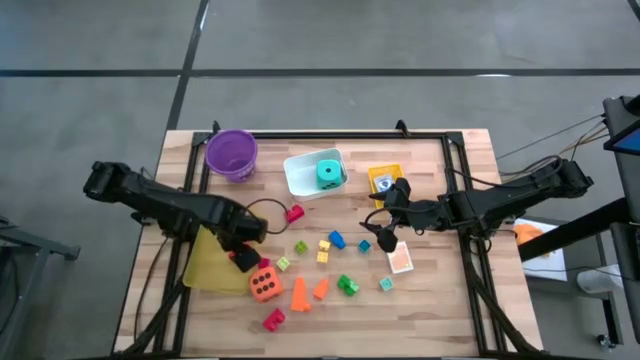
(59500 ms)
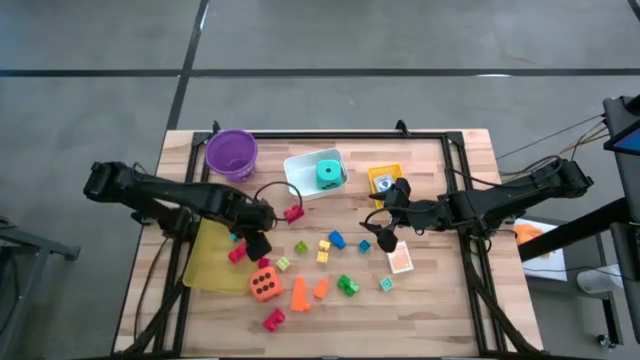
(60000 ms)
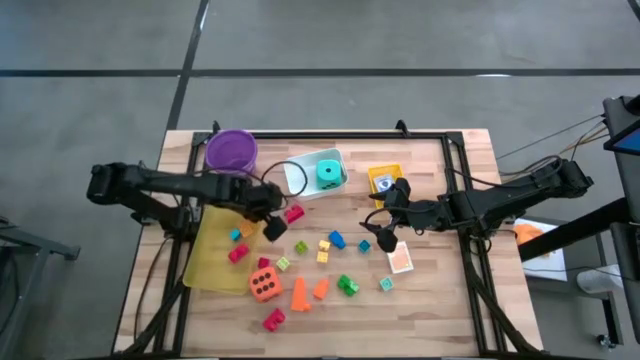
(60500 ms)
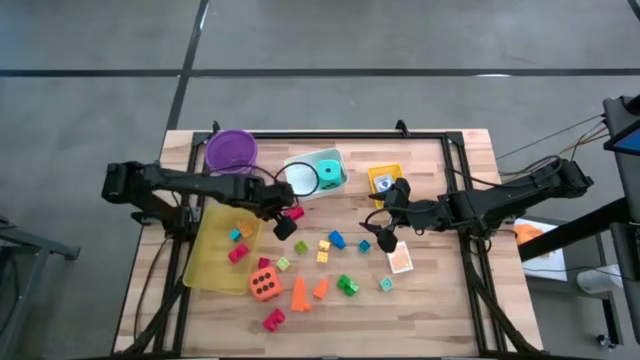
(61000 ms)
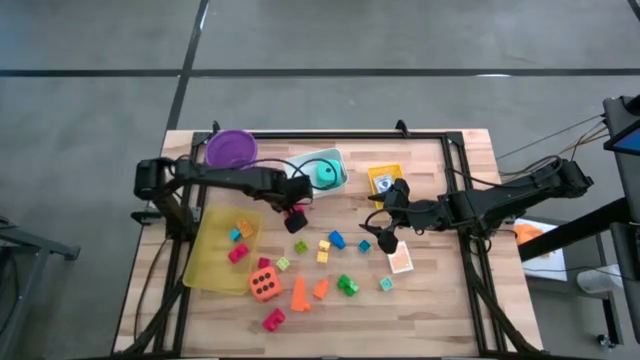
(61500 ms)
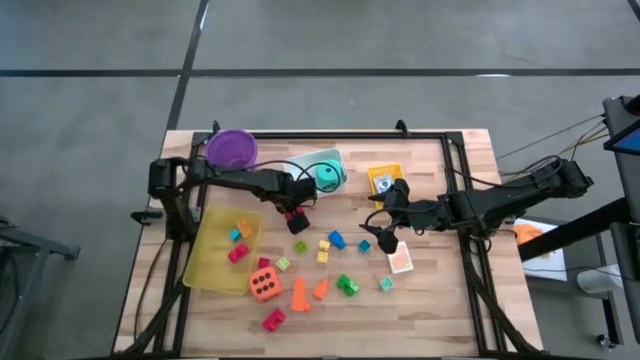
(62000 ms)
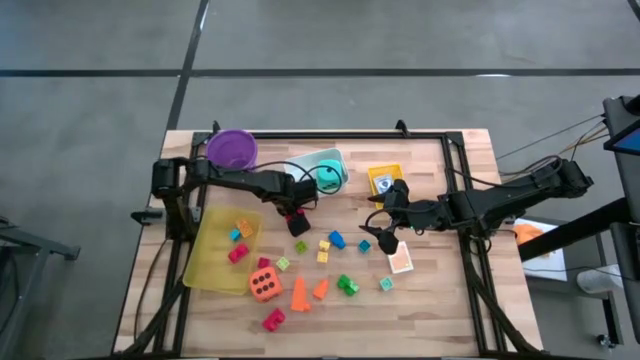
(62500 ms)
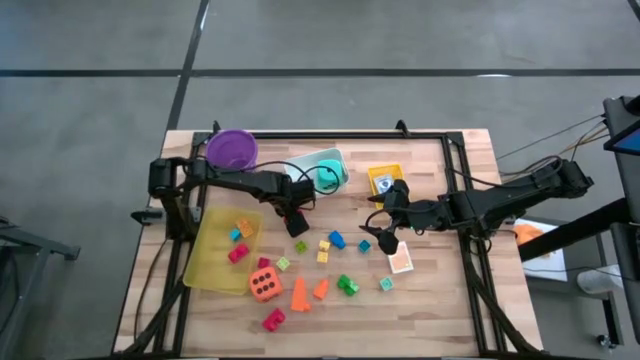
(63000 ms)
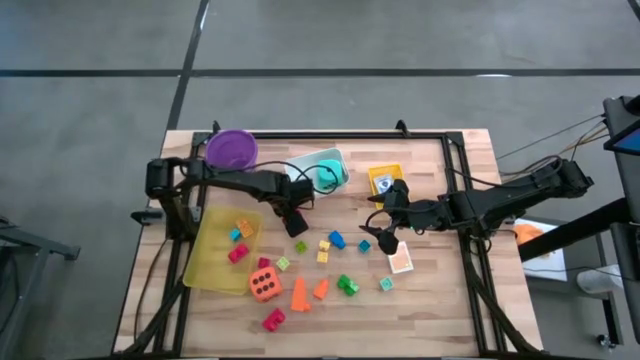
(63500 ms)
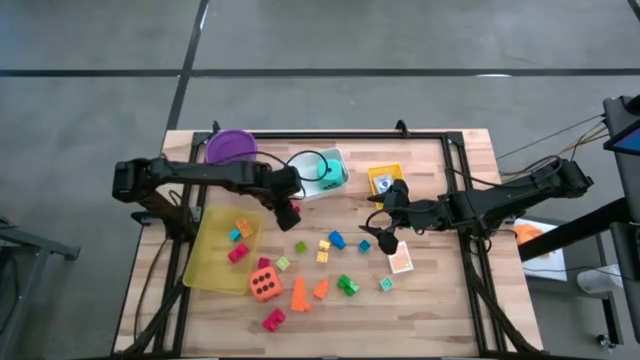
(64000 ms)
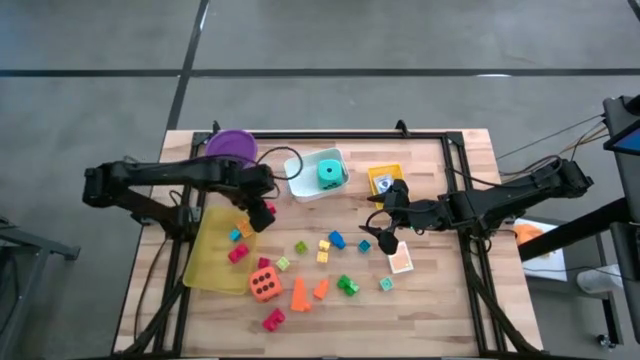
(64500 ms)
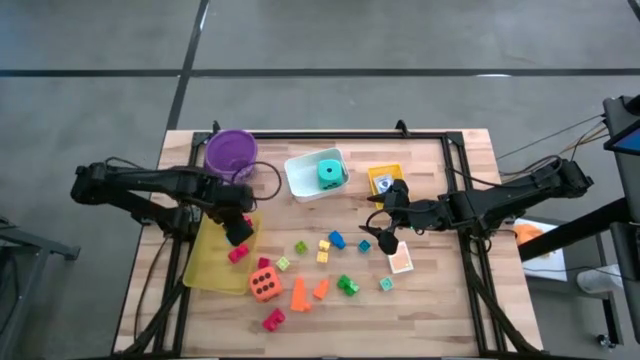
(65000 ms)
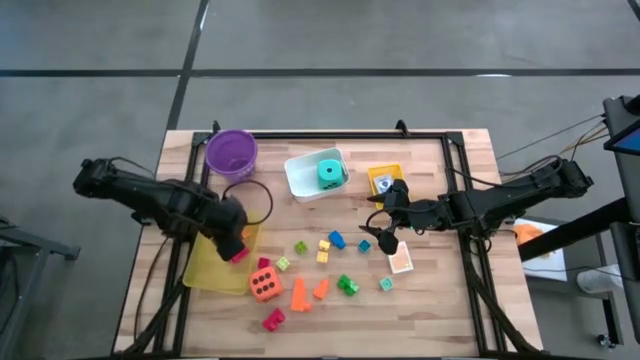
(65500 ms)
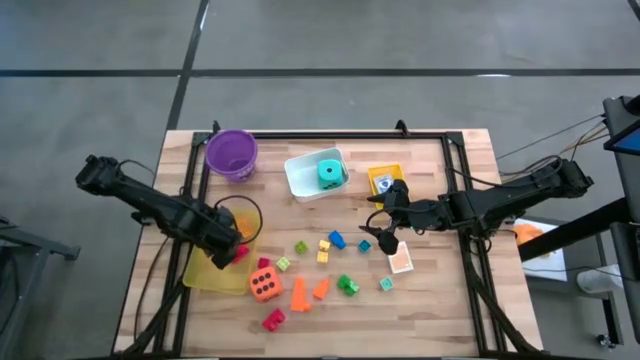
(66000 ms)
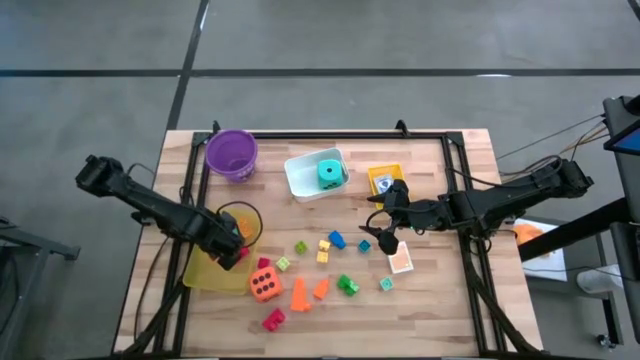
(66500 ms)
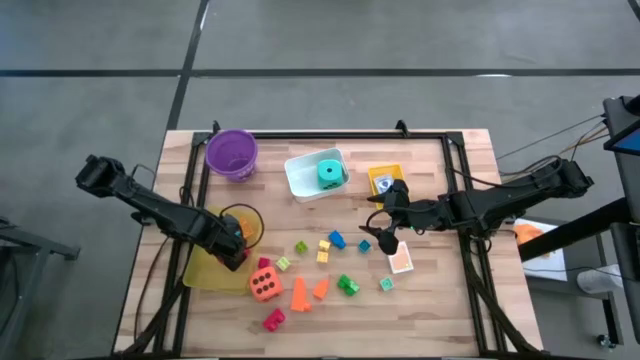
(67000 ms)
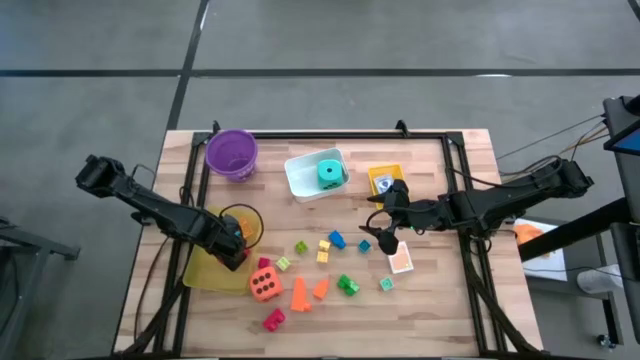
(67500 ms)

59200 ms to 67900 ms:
Task: Pick & Place Toys
Put the red game piece into the light yellow bin

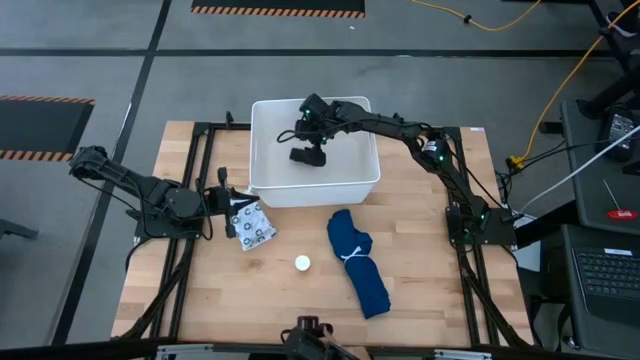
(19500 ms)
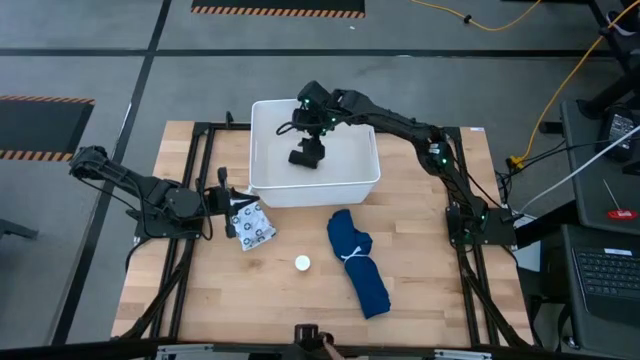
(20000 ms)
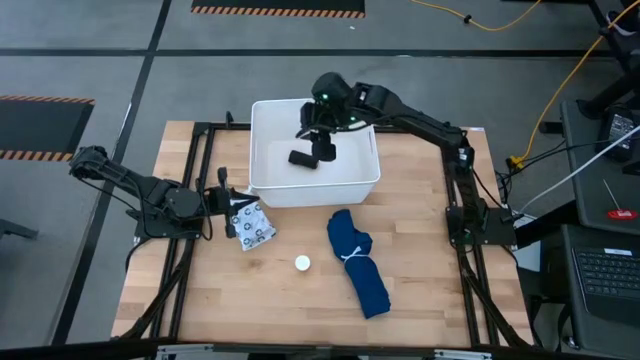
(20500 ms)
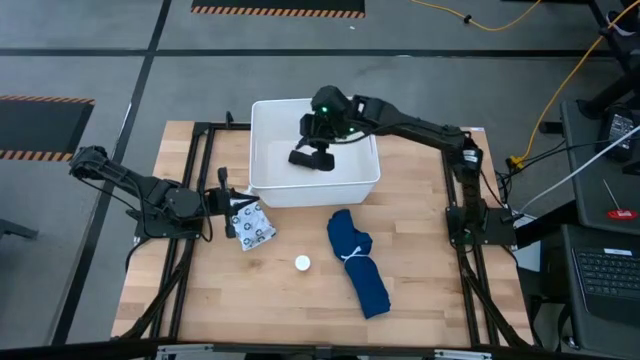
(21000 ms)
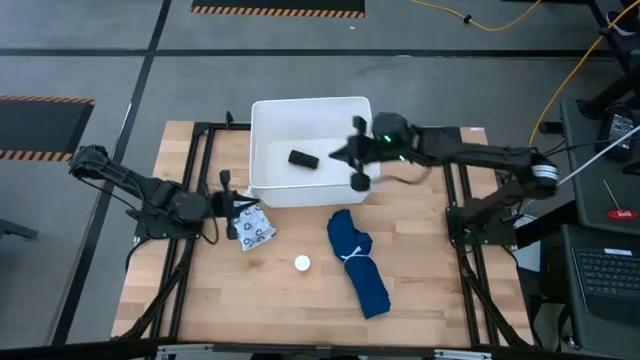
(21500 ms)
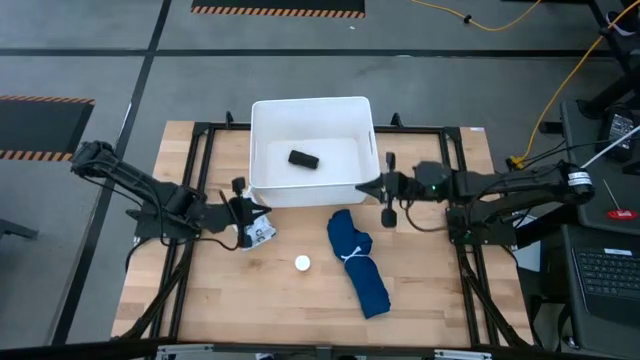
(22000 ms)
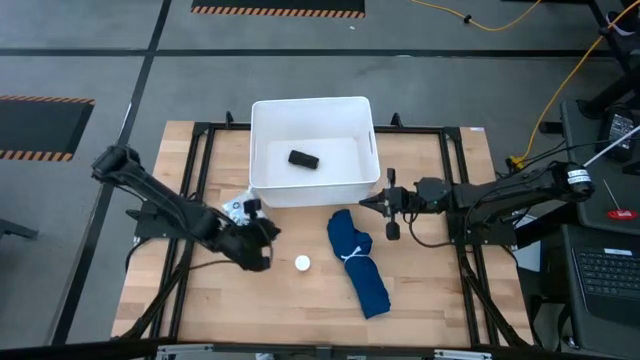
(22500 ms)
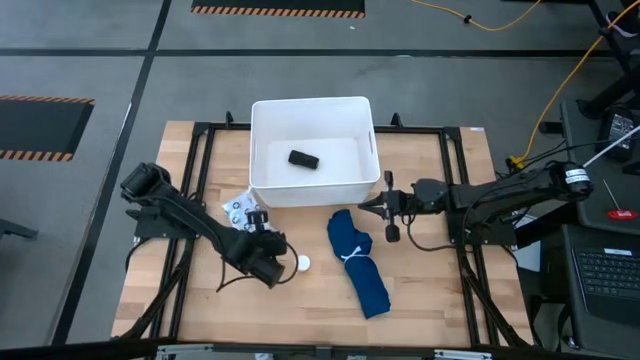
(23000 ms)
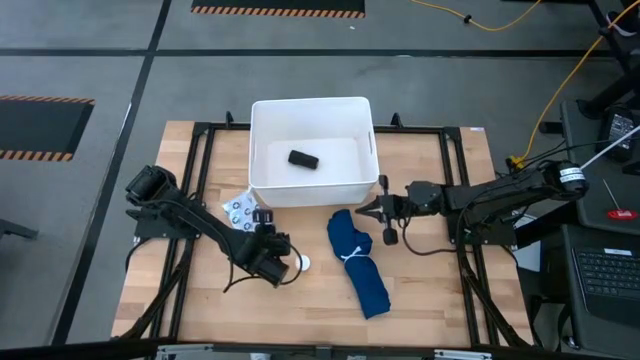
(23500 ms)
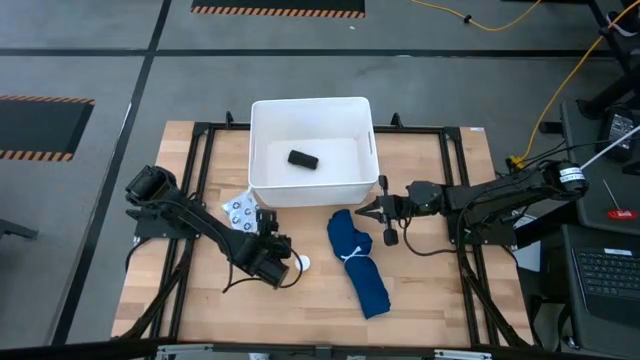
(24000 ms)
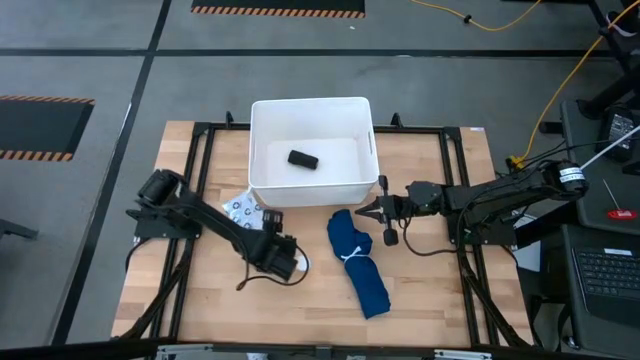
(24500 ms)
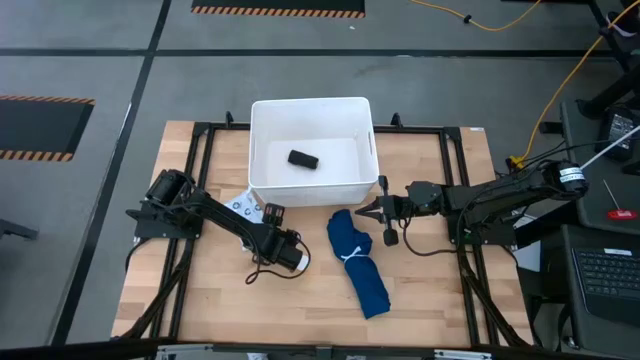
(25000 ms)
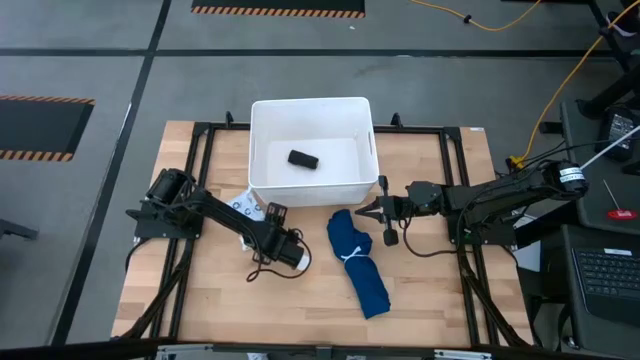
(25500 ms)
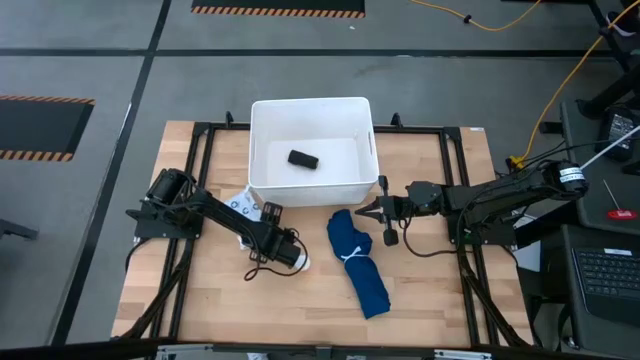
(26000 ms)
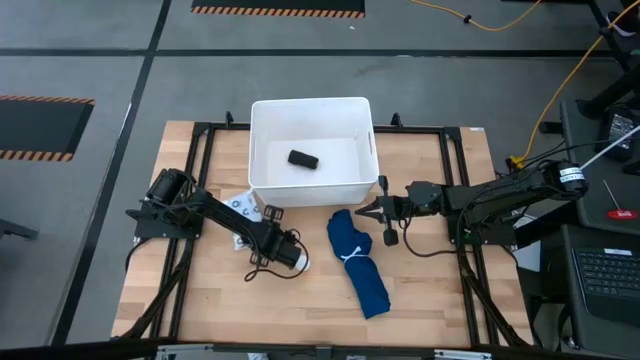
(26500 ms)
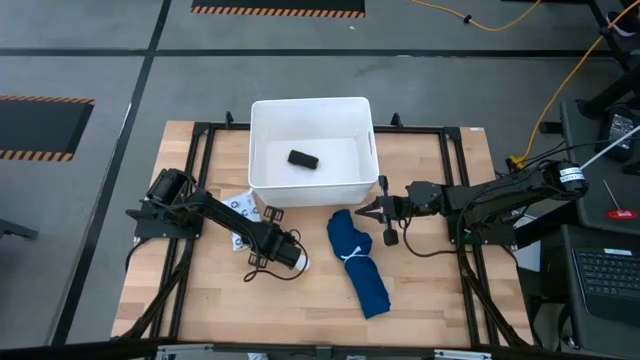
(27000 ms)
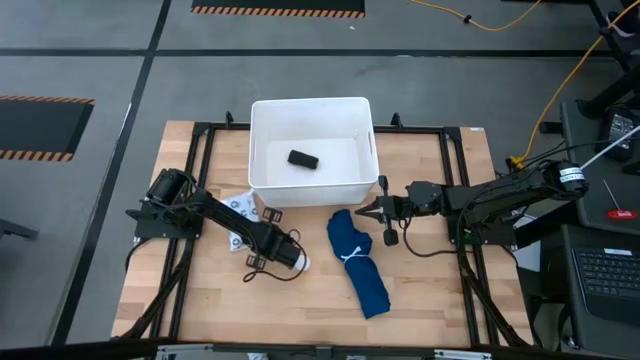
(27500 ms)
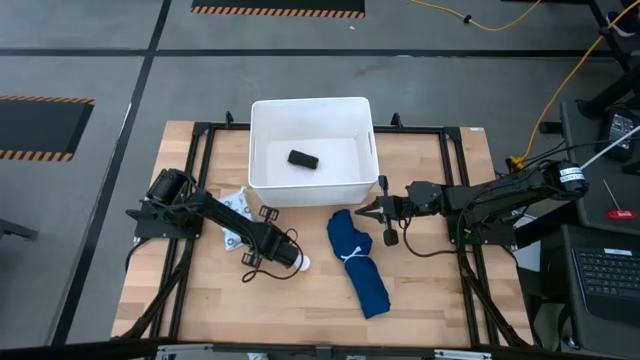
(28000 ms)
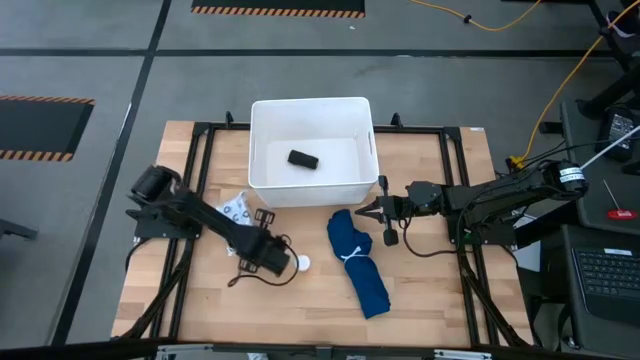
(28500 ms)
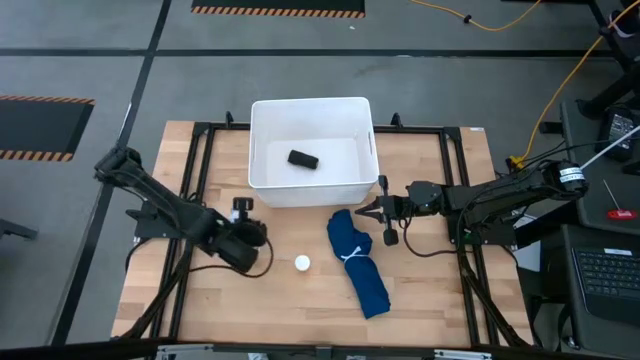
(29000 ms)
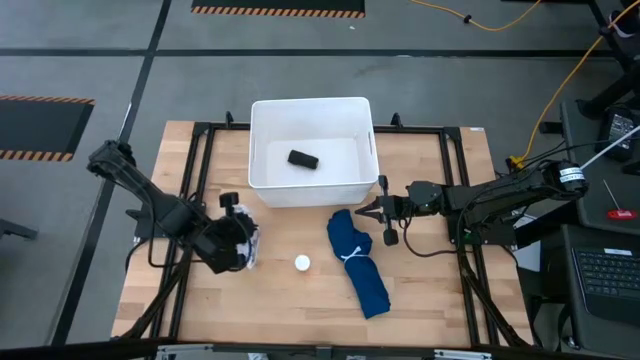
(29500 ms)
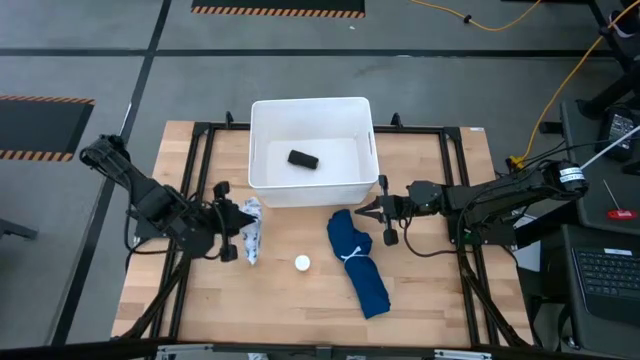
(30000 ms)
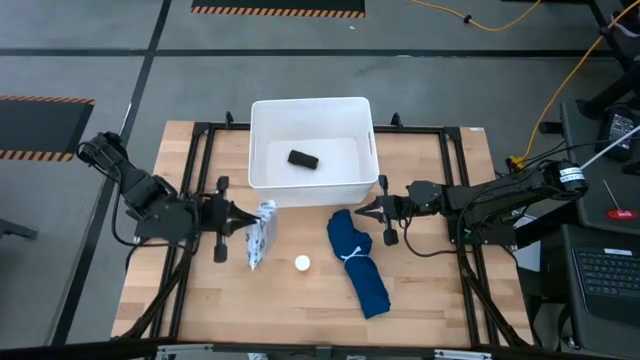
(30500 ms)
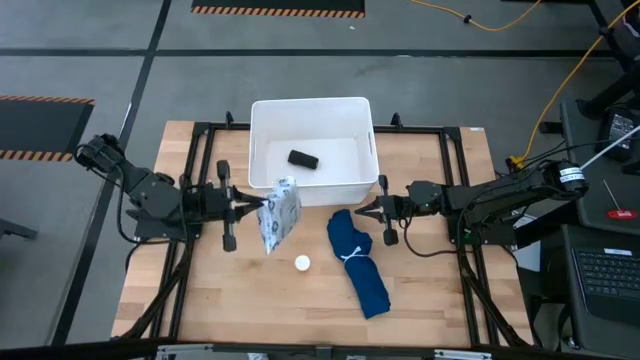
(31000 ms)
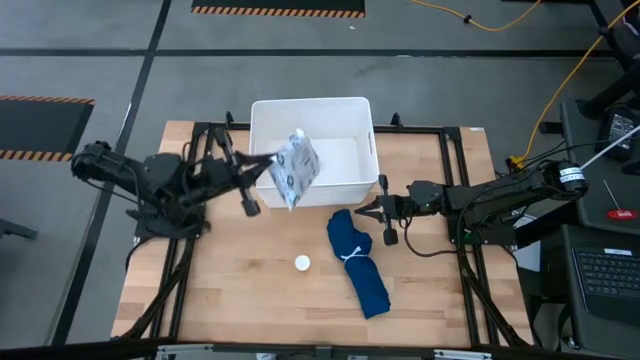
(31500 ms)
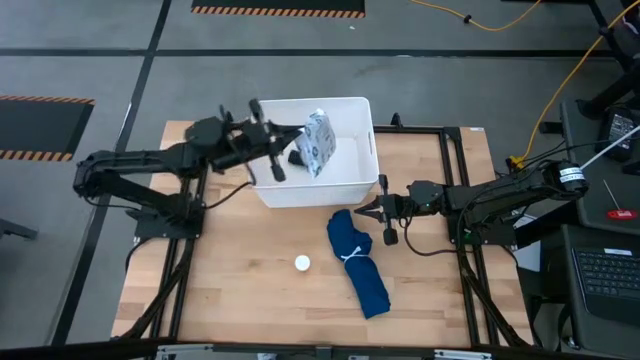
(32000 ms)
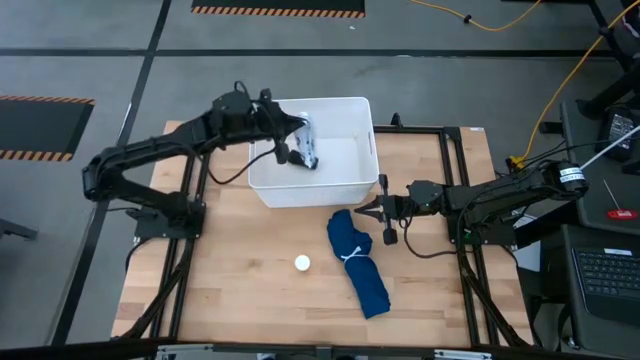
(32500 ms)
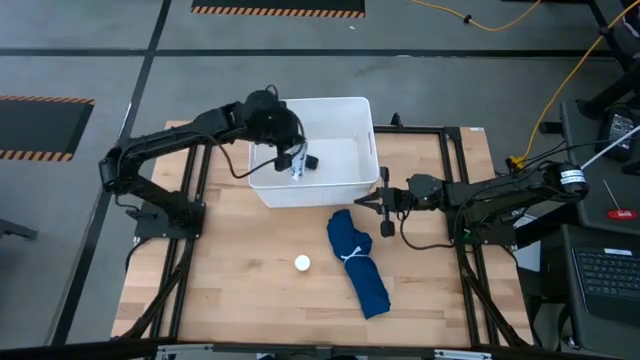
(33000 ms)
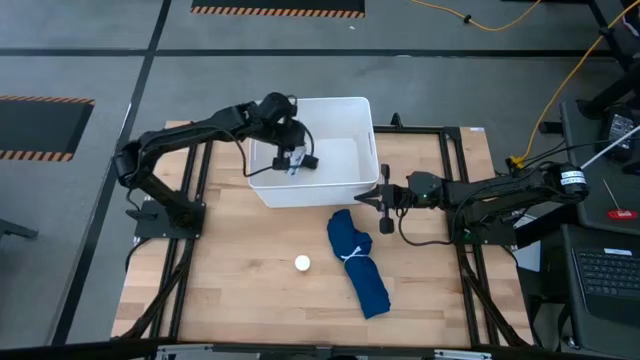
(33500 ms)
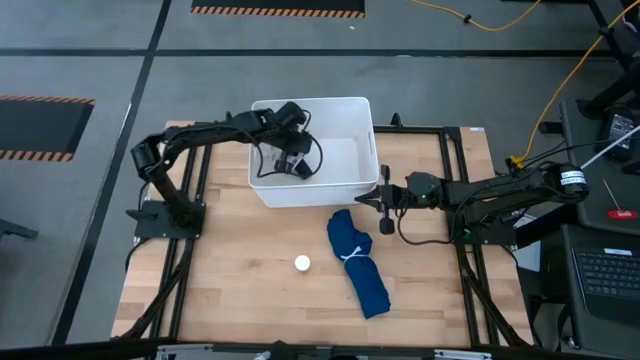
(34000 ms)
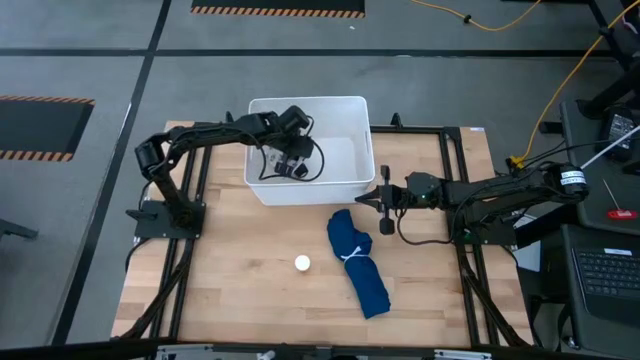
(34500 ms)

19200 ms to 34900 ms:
Task: Pick & place medical supplies in basket/bin
Put the mailer bag into the white bin
